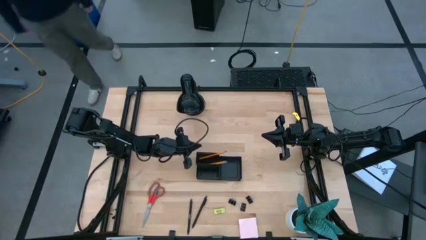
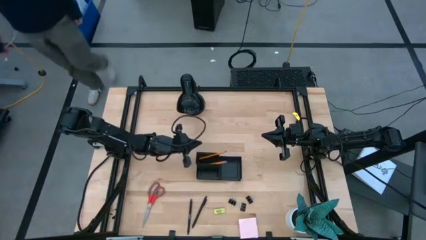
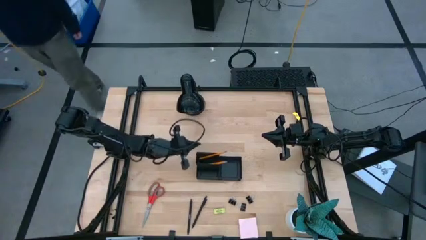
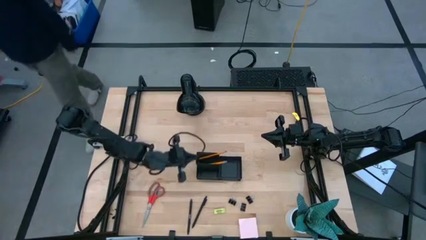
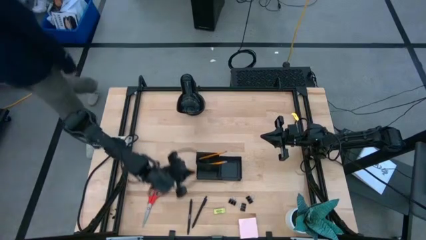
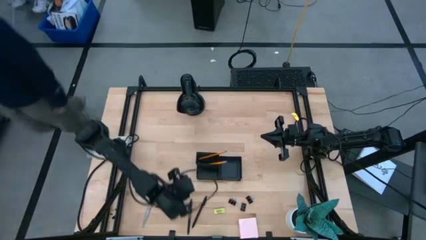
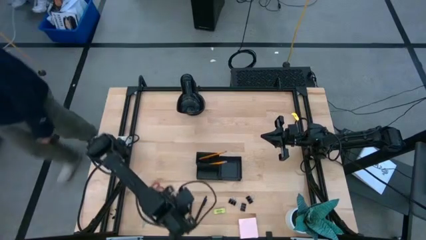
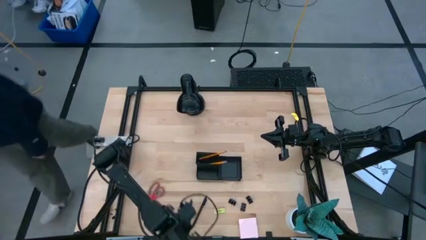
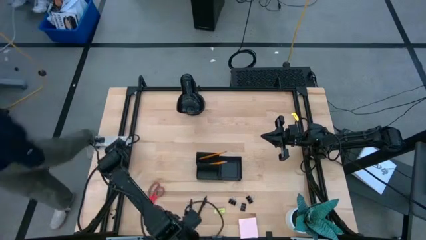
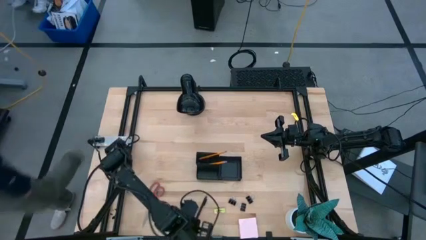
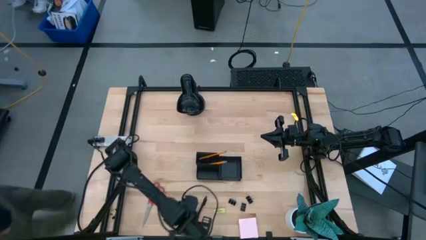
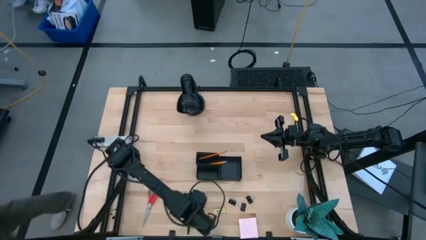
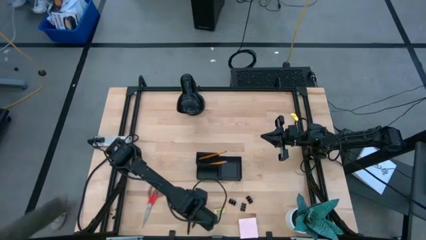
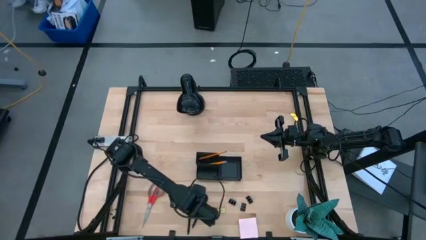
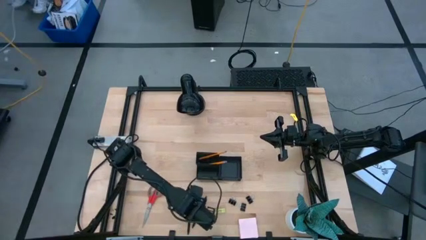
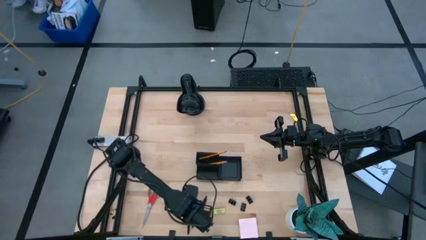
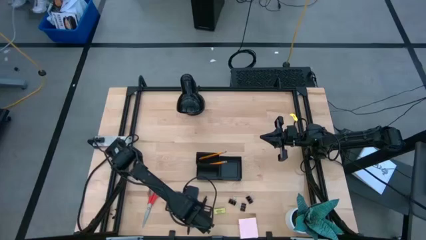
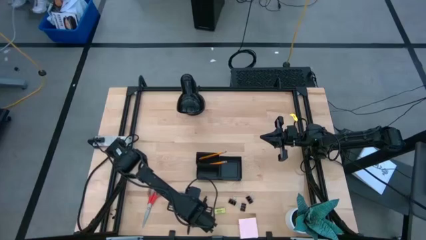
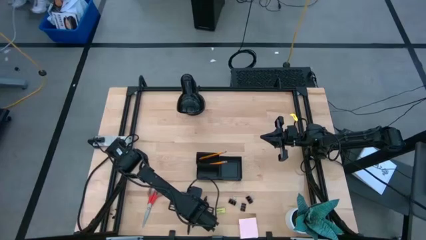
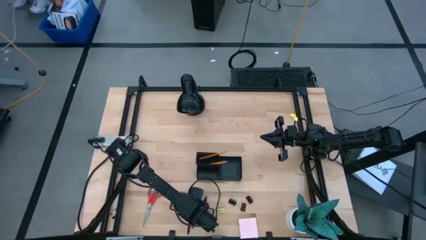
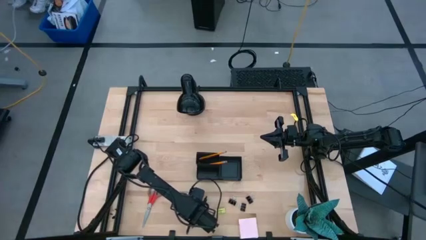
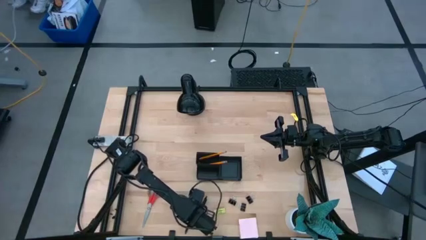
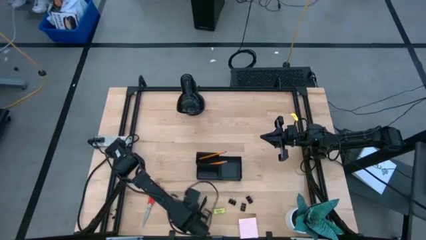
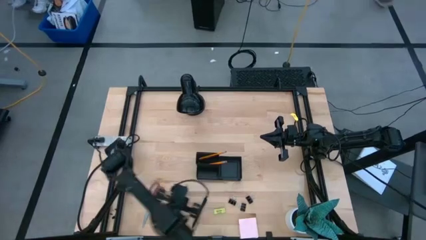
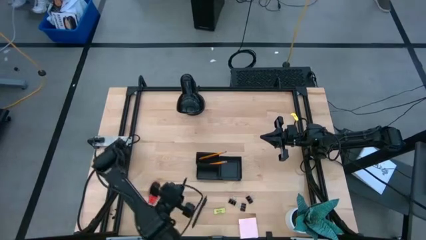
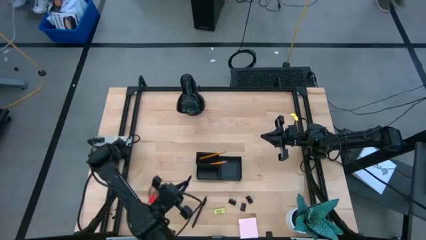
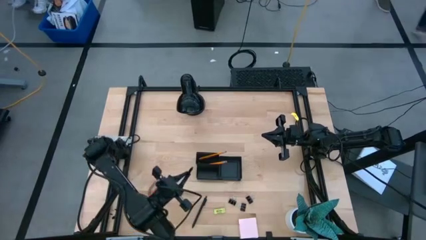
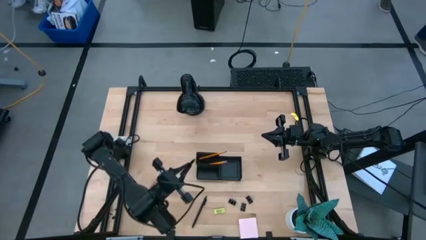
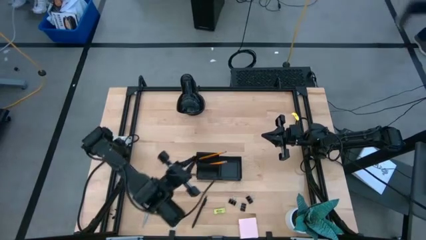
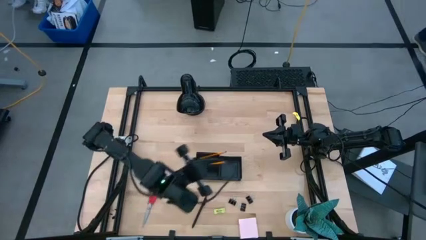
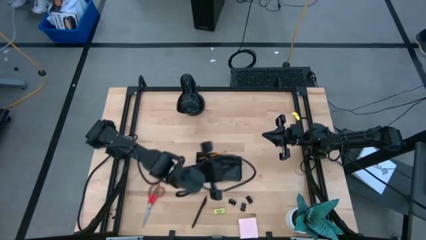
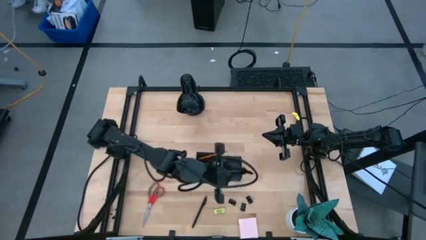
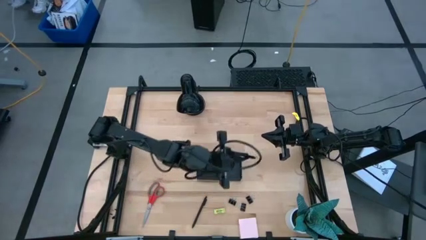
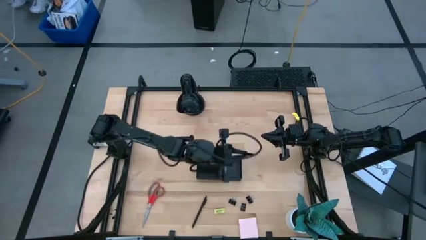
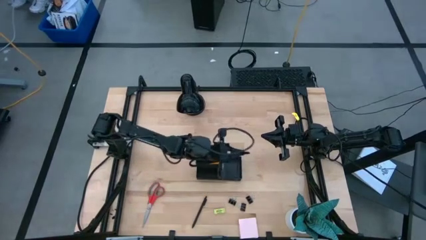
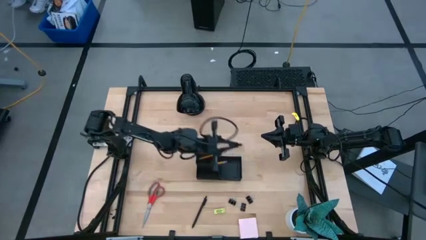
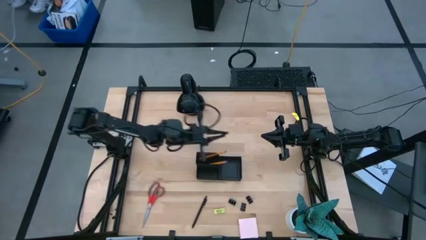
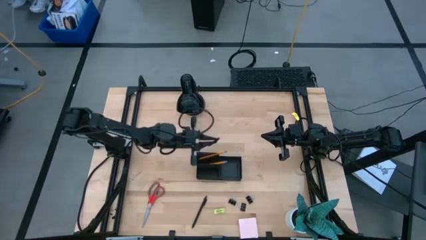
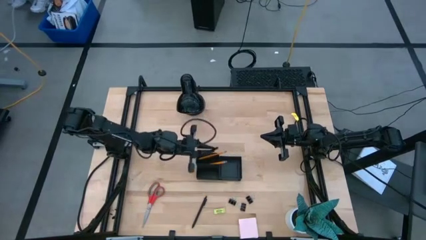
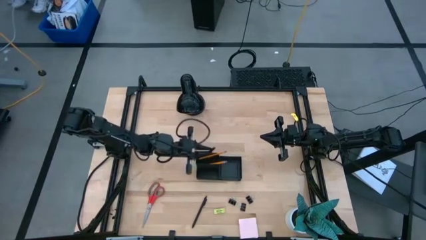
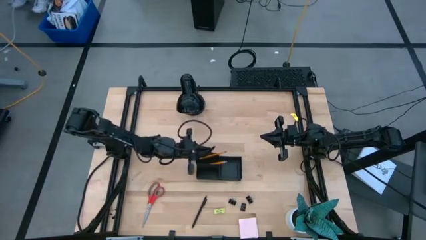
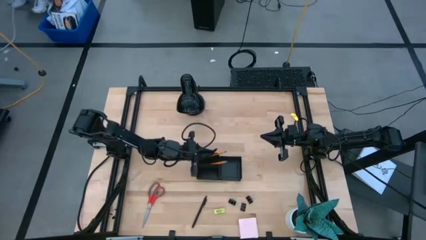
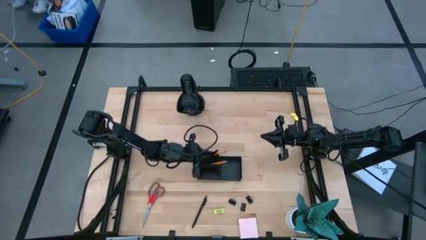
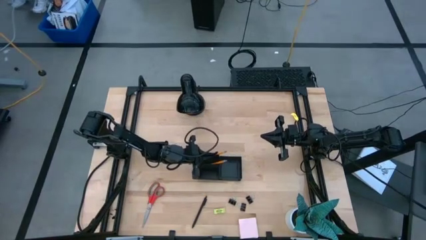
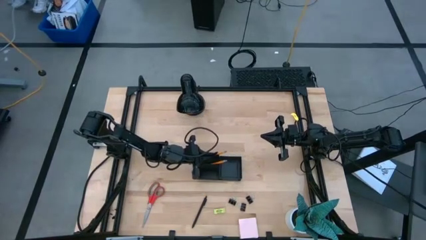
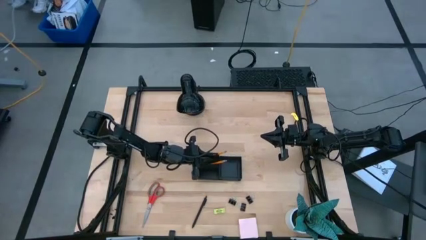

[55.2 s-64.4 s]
Task: Pick and place office supplies into organizer
Put the black pen into the desk organizer

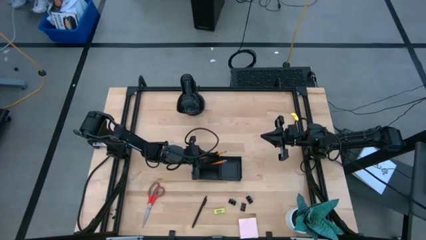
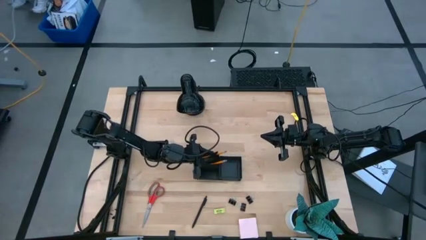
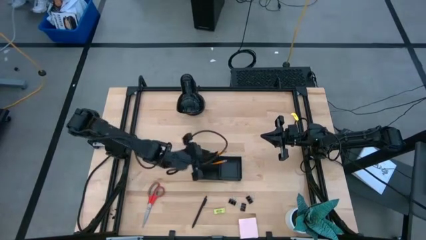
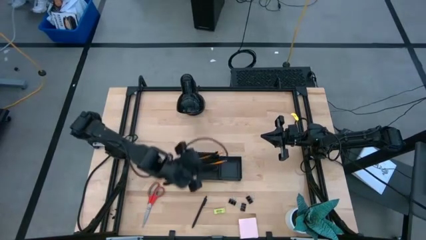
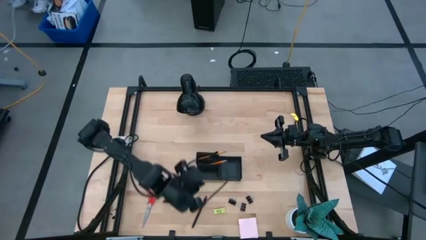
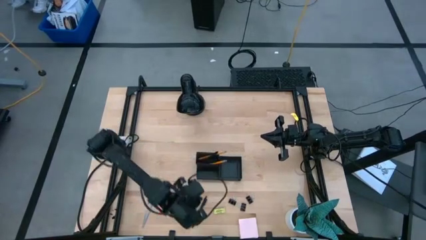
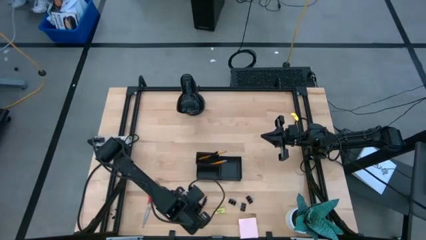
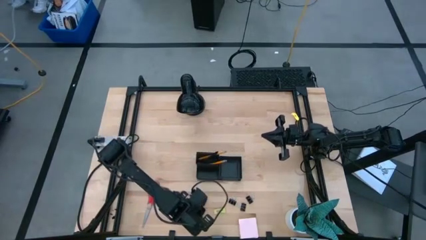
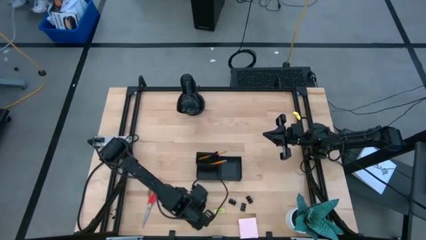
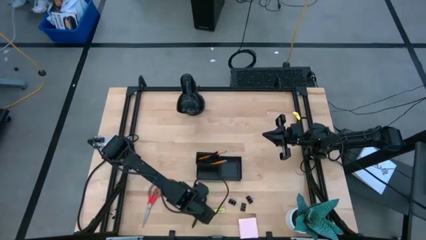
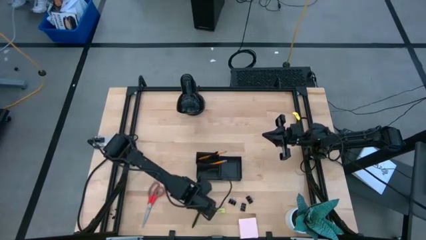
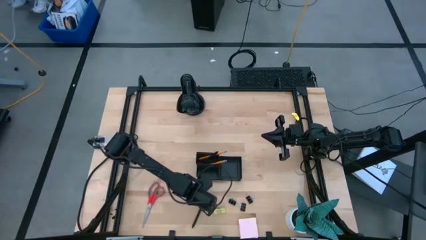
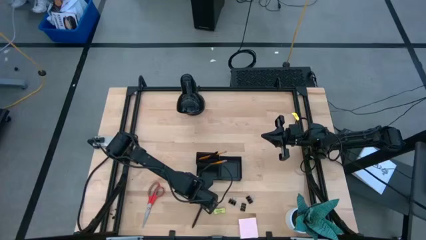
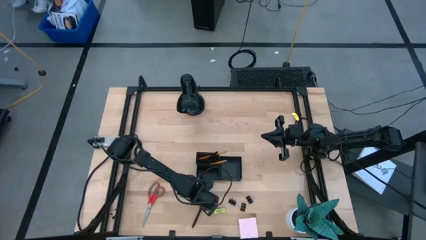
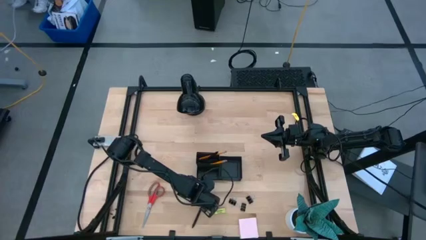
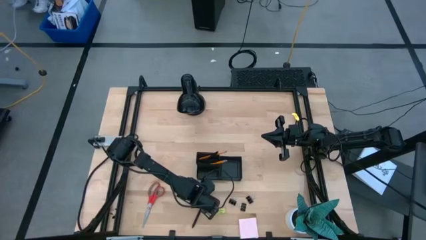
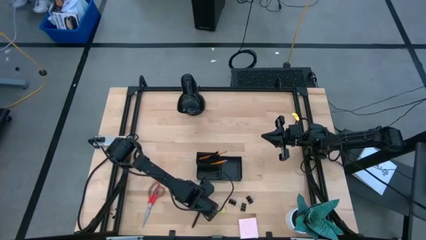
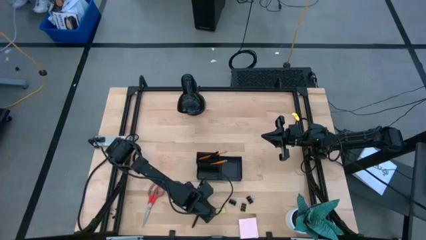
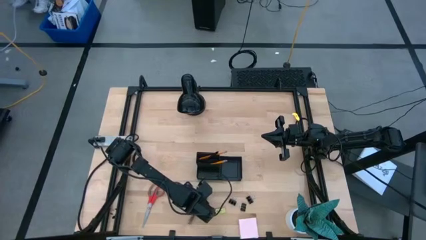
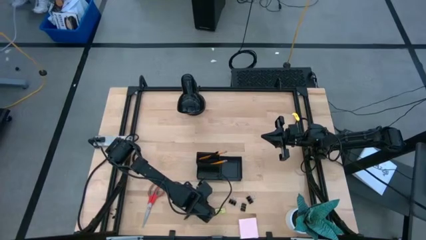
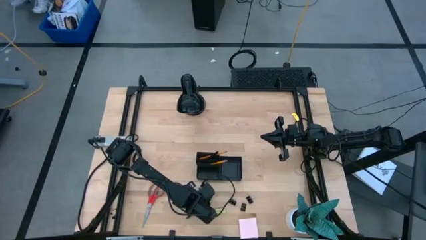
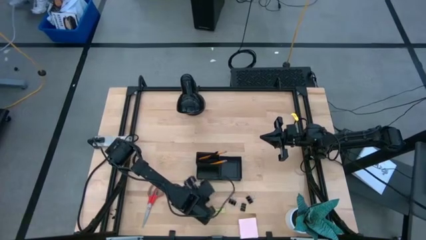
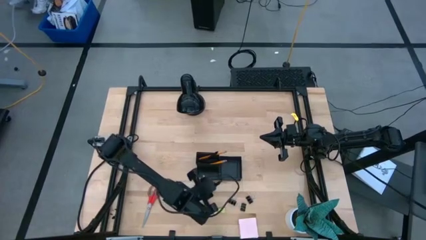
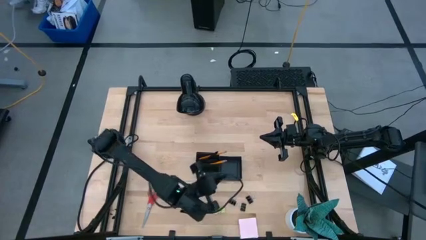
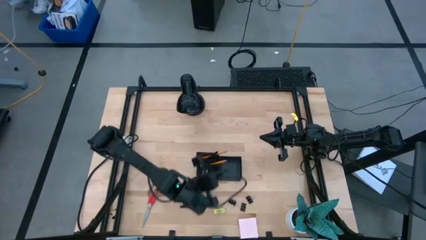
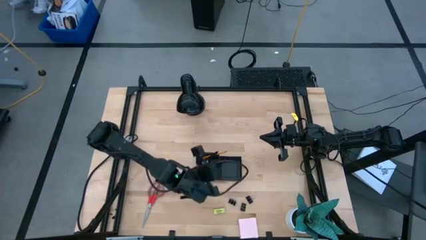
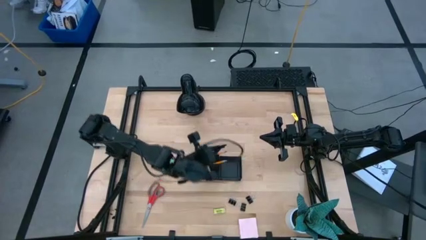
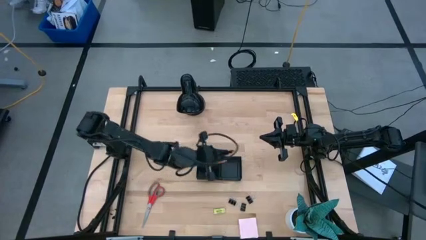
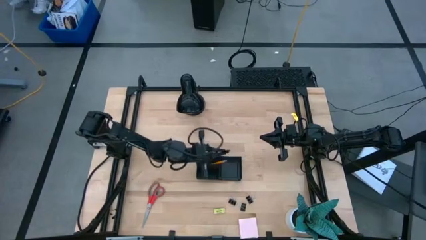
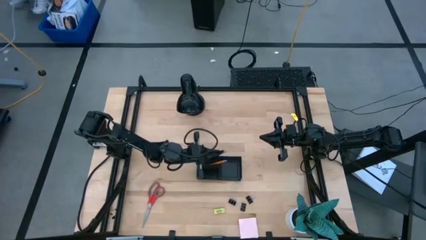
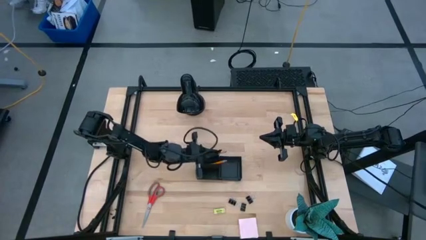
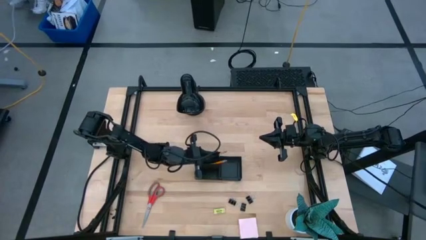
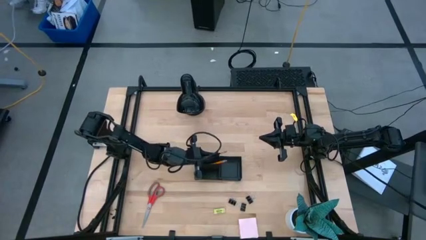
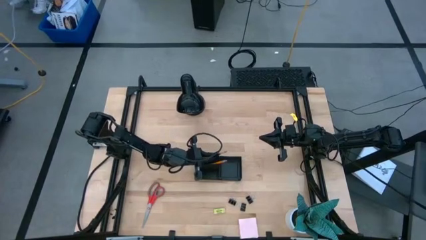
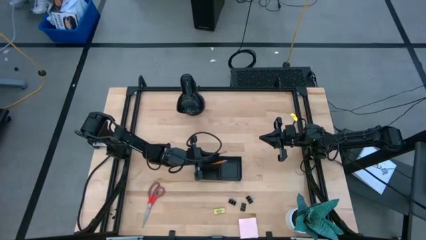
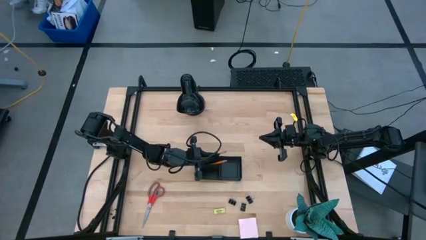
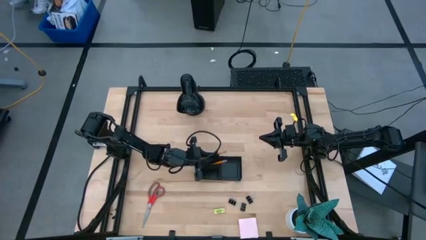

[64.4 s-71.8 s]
Put the black pen into the desk organizer

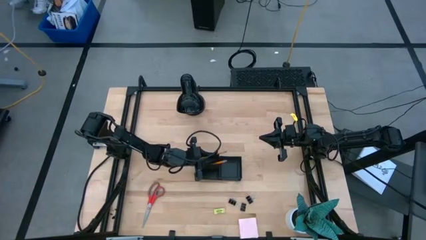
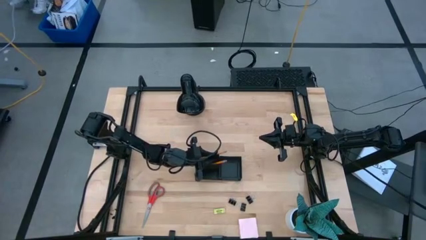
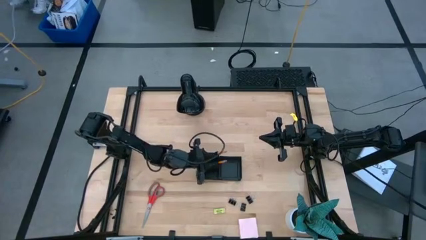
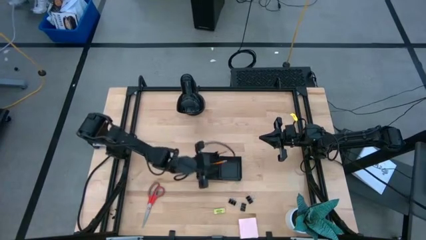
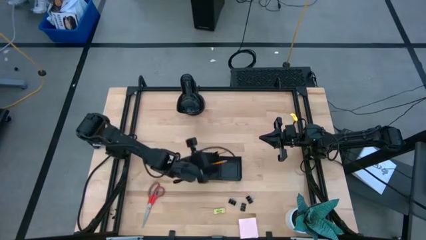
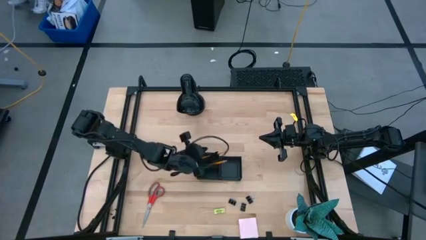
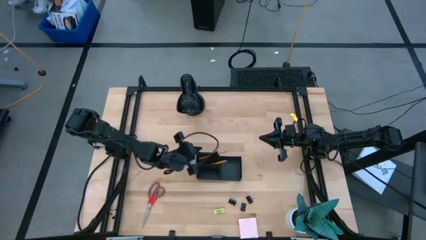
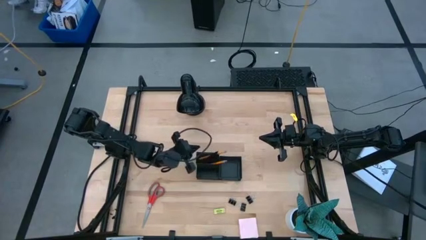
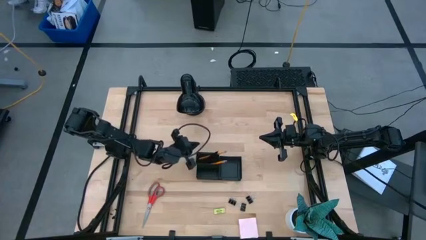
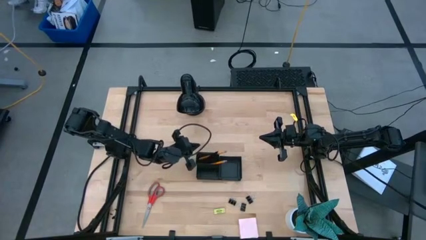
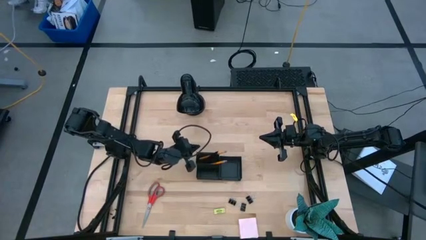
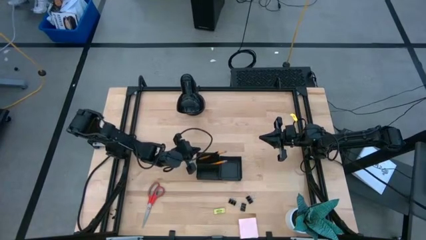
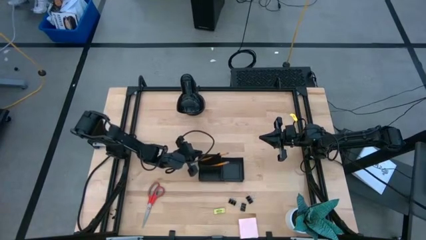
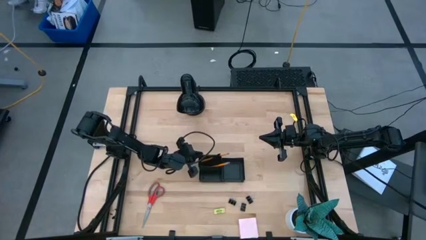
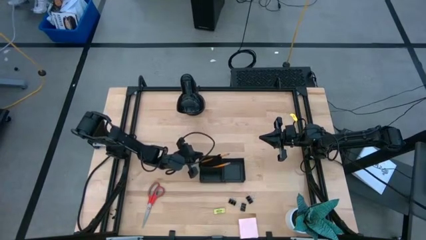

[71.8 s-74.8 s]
Adjust the desk organizer
